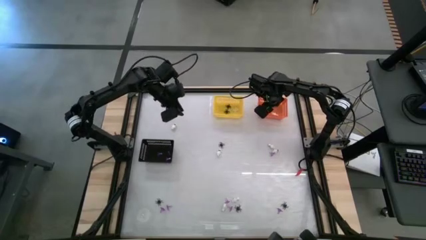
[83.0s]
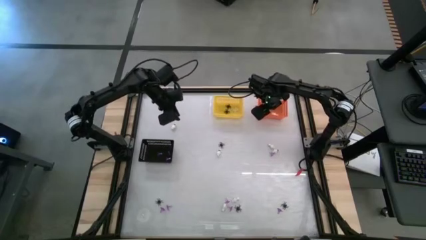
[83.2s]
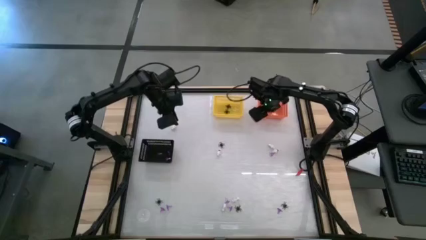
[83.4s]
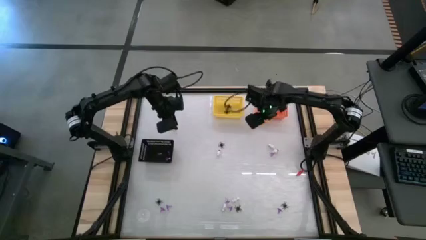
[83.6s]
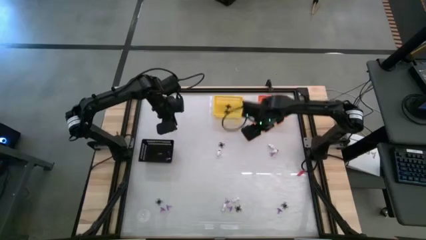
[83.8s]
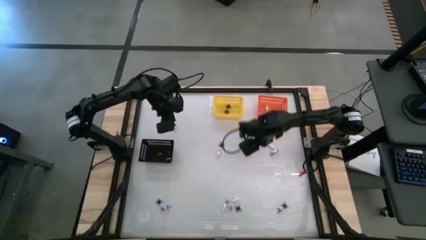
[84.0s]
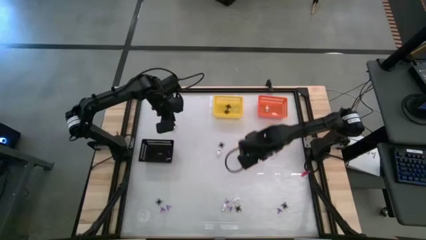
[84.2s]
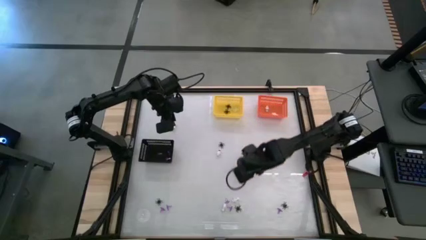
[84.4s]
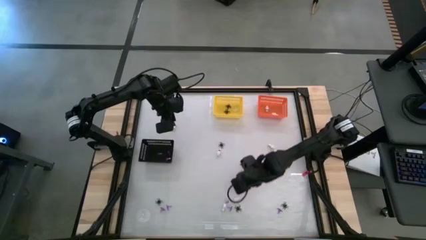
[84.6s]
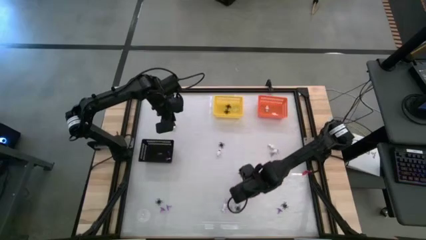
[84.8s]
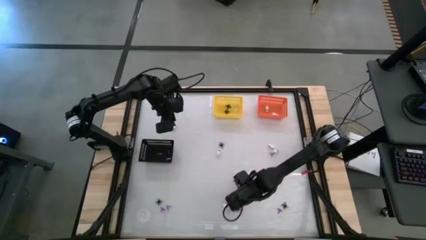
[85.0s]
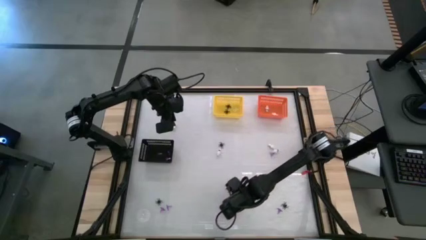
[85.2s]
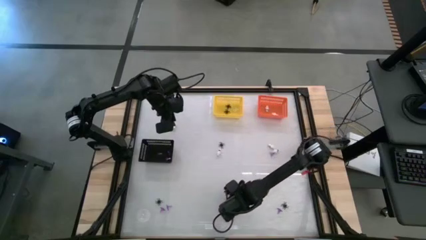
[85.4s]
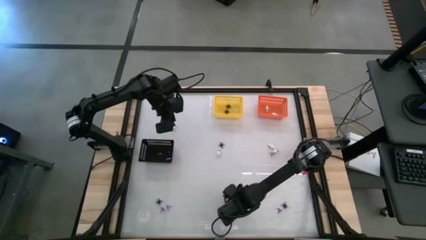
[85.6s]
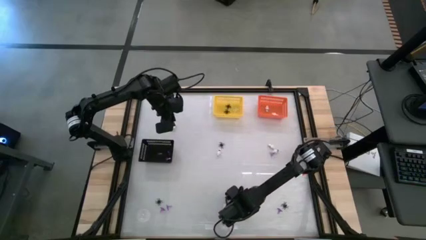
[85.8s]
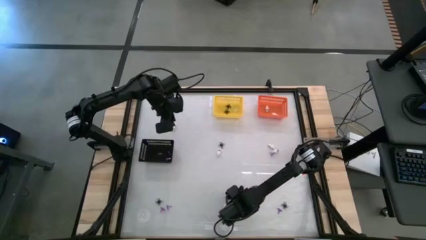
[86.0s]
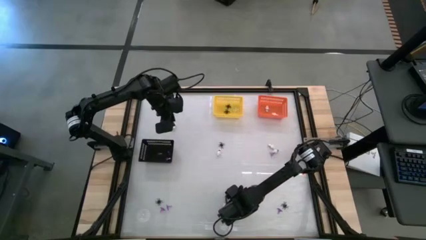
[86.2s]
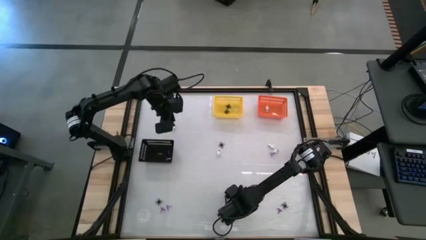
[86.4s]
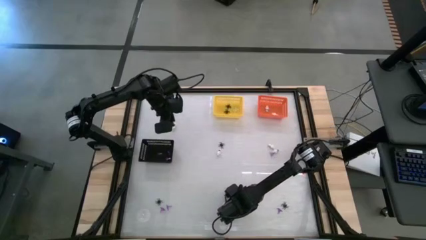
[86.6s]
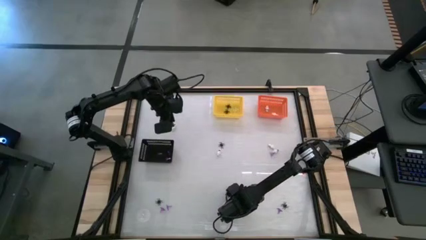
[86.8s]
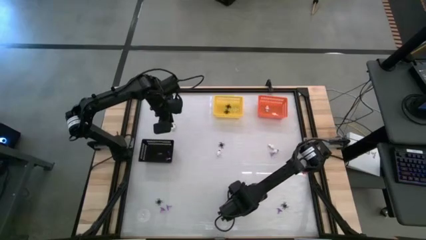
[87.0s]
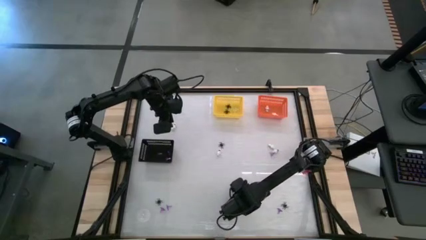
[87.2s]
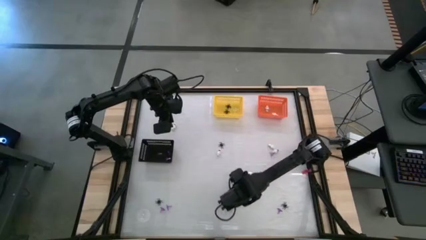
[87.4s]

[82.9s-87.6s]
Task: Sort Halloween decoration
Put the black spider toy into the yellow bin

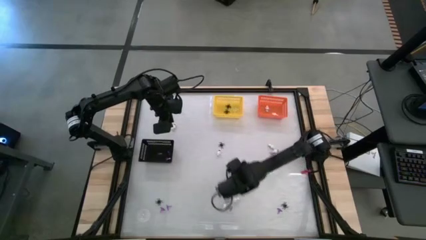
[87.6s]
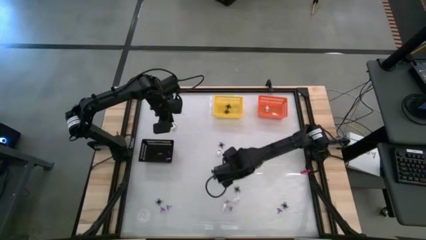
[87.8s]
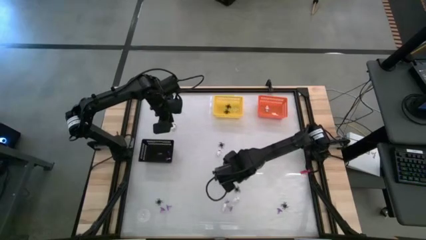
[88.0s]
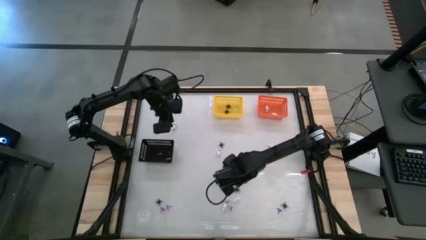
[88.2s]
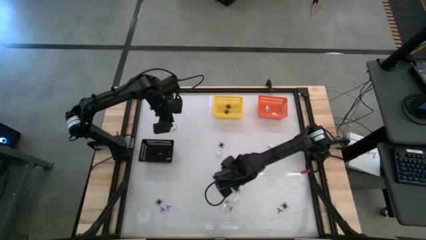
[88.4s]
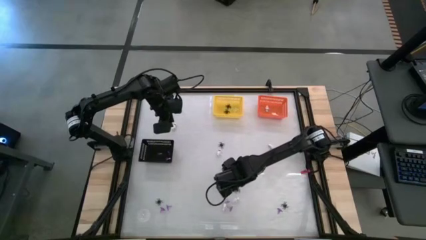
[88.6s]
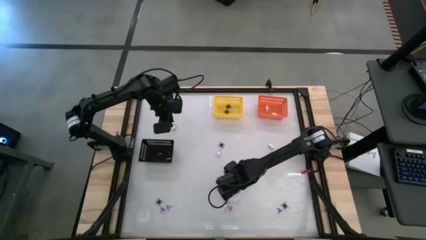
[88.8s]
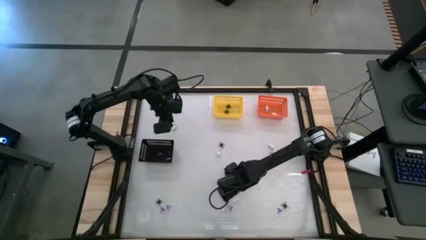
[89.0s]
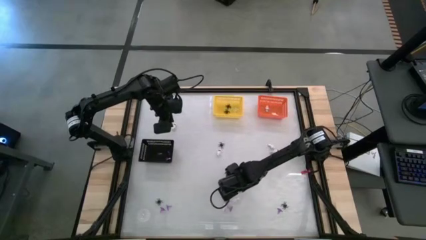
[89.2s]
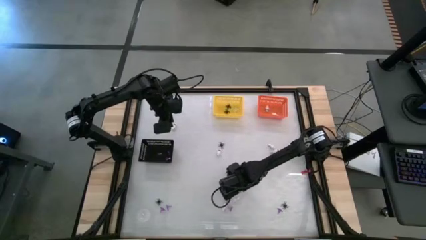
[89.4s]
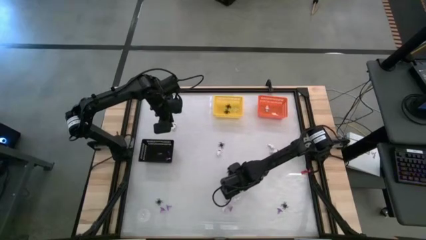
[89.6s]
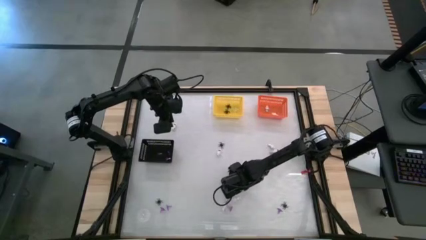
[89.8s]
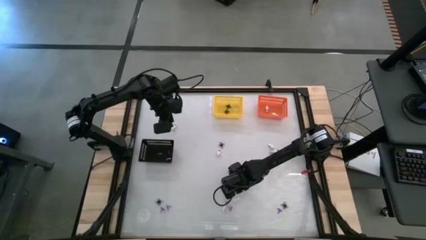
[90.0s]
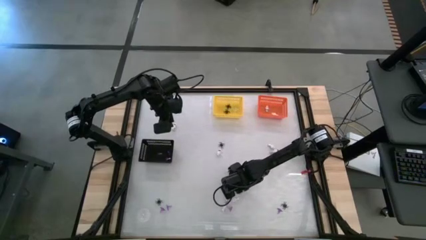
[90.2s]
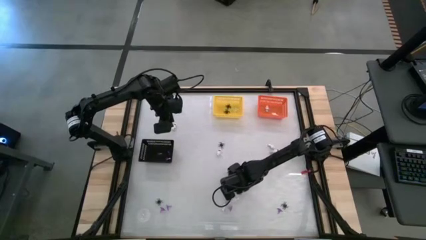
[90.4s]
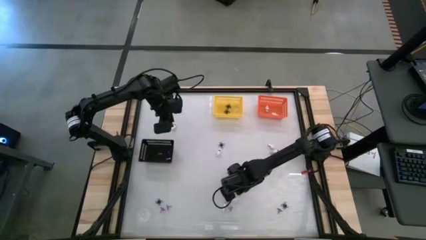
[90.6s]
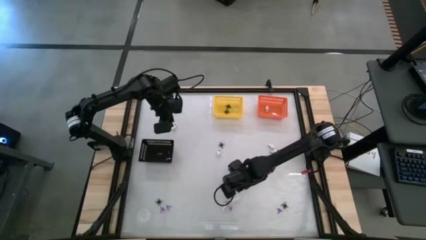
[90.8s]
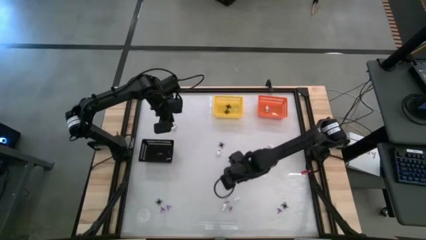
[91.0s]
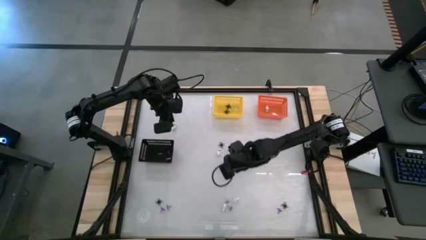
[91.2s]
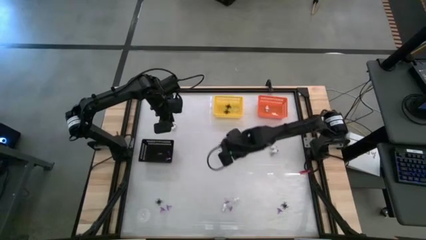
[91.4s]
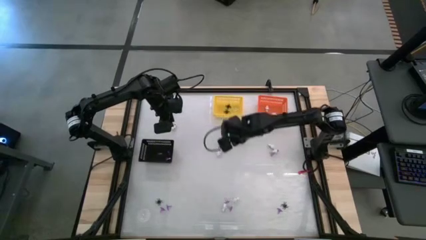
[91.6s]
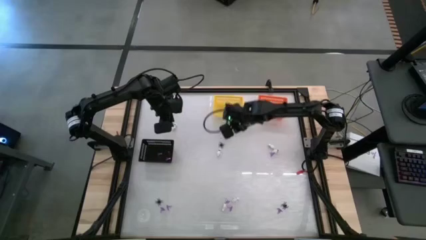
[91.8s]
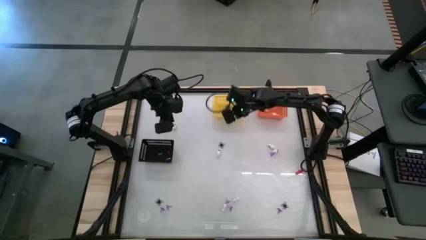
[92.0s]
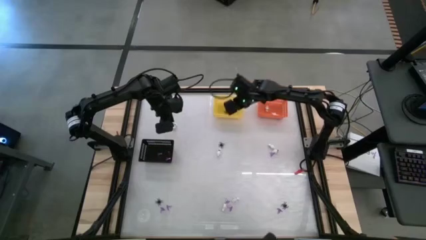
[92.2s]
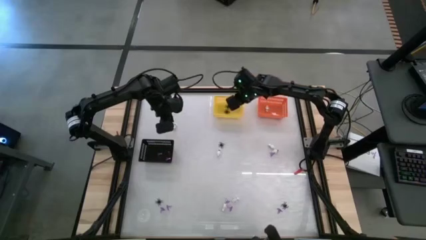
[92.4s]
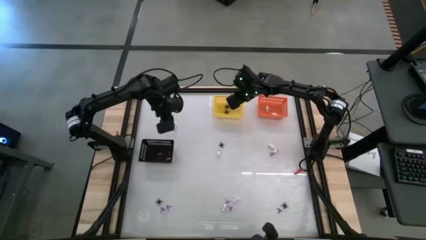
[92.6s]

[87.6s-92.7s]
Put the black spider toy into the yellow bin

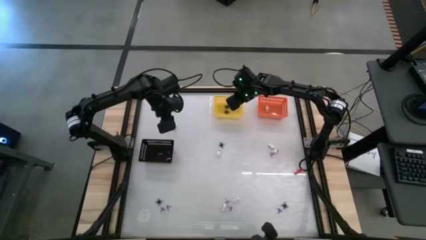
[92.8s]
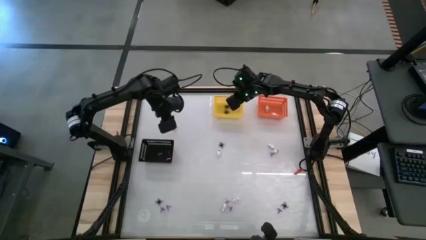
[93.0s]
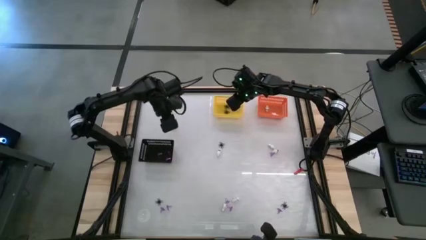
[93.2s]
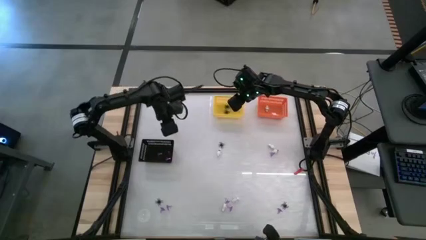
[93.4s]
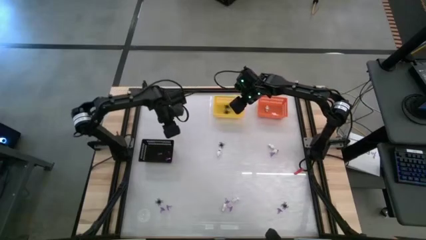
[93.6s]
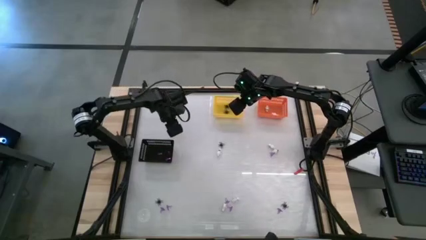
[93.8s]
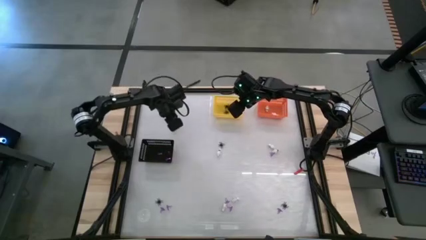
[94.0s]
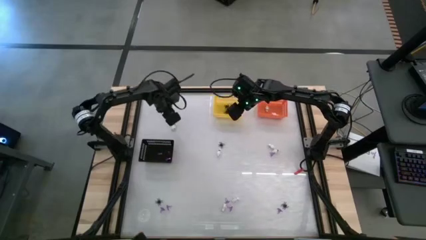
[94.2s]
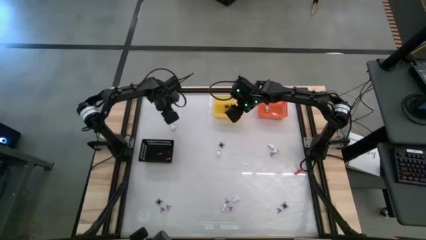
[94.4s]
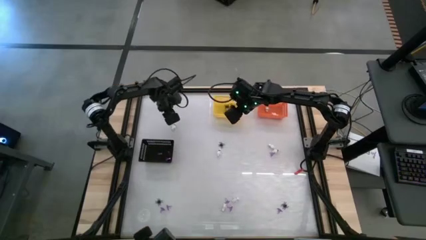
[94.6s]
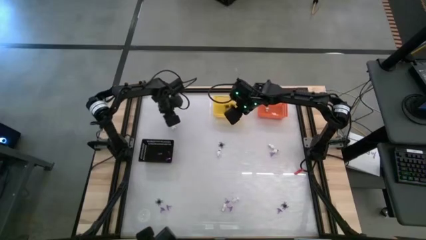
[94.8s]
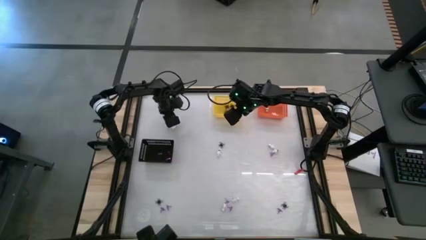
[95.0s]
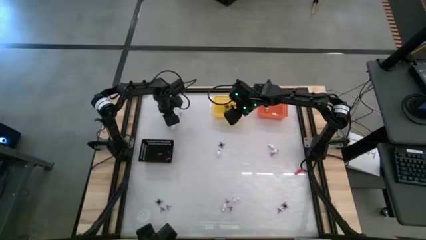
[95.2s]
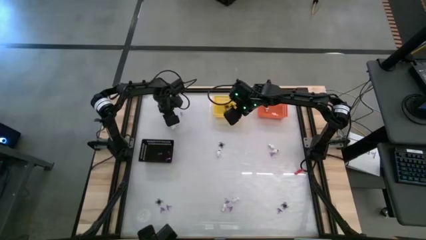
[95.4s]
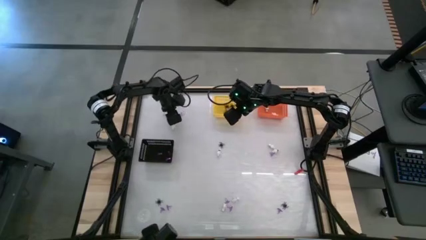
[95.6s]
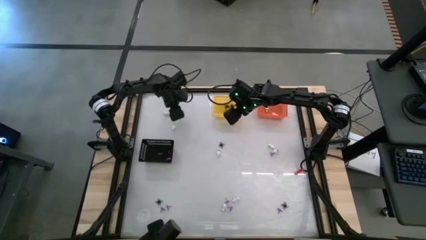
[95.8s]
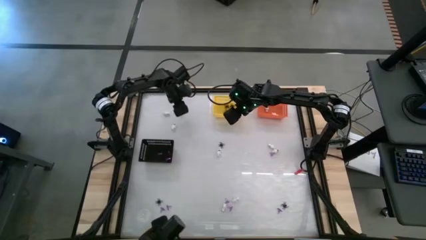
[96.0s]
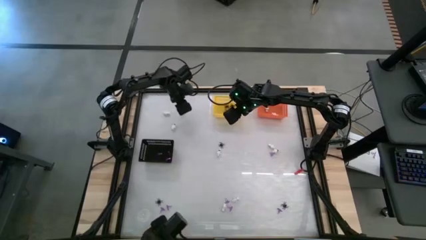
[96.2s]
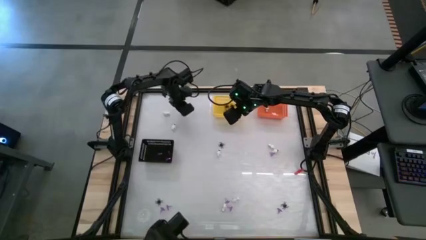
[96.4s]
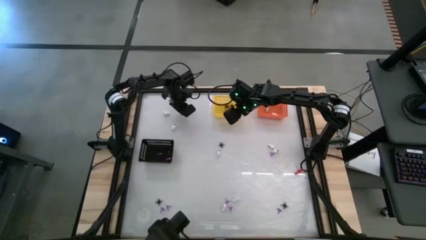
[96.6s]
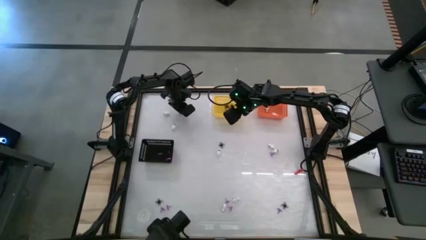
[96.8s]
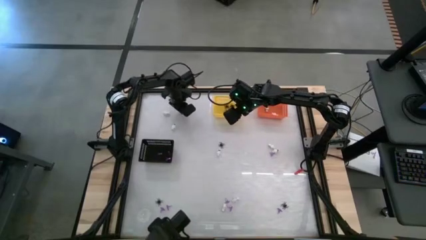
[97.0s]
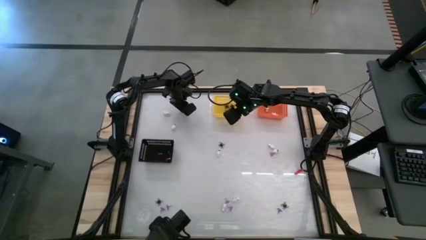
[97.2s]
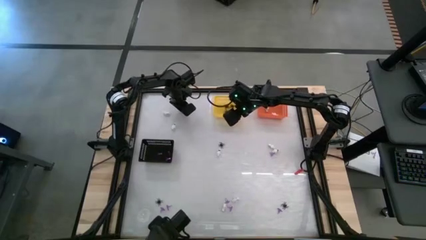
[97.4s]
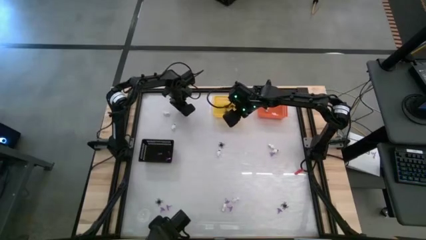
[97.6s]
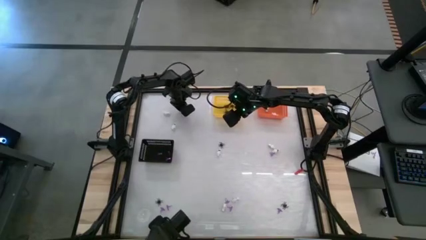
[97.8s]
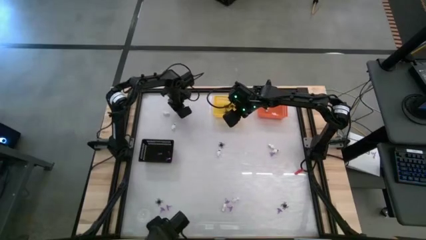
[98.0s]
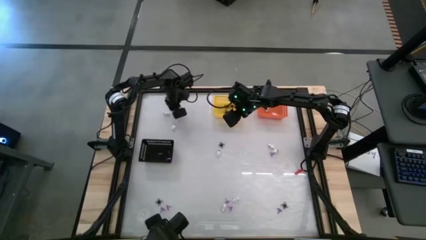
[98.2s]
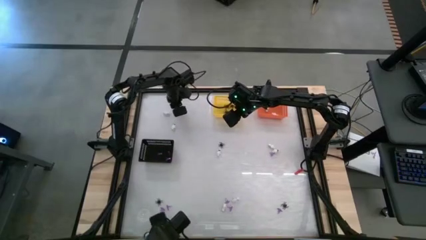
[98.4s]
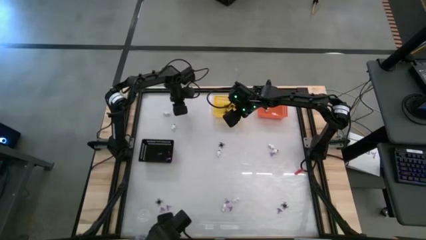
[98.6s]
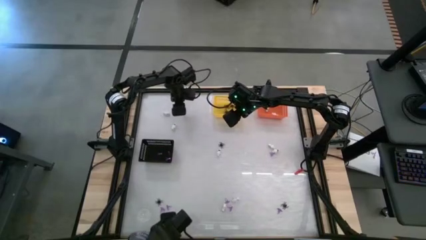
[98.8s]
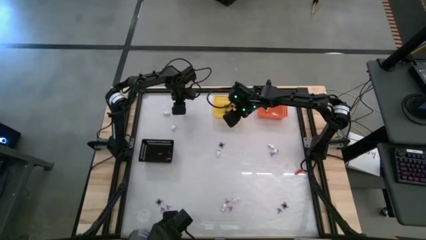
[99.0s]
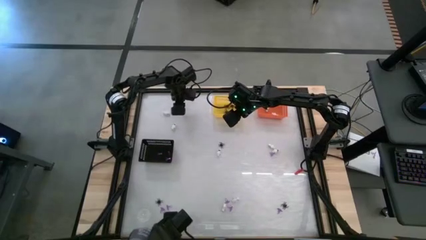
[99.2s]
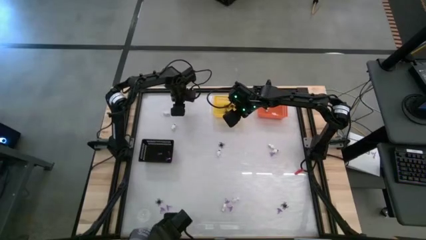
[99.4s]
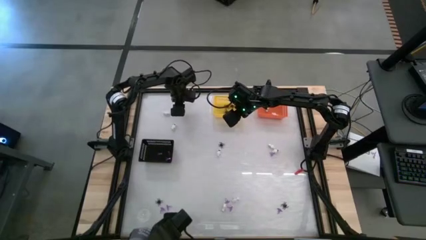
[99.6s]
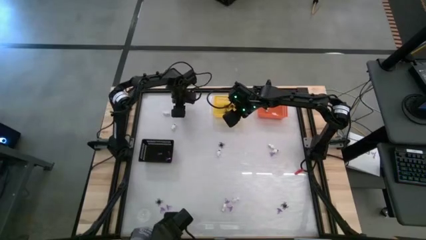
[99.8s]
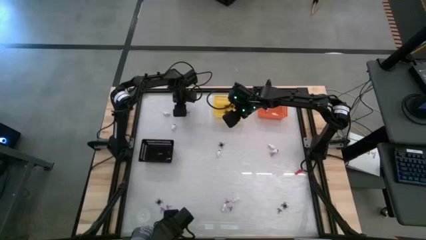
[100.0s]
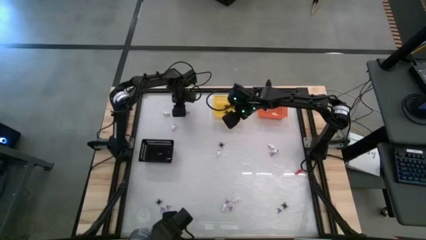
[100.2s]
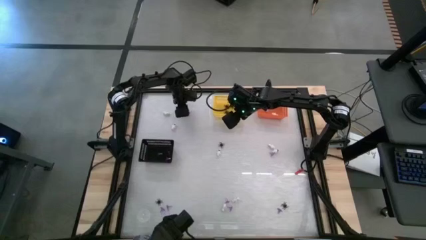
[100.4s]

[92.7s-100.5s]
Put the purple witch hat toy into the black bin
